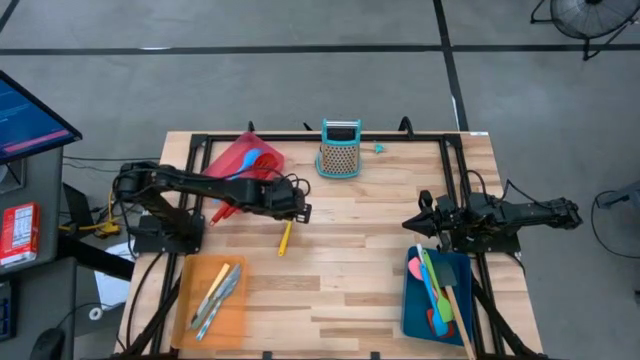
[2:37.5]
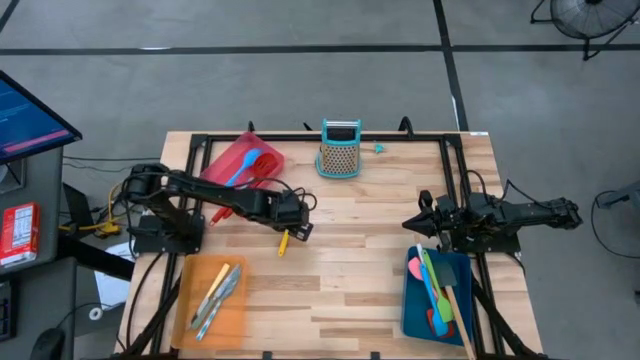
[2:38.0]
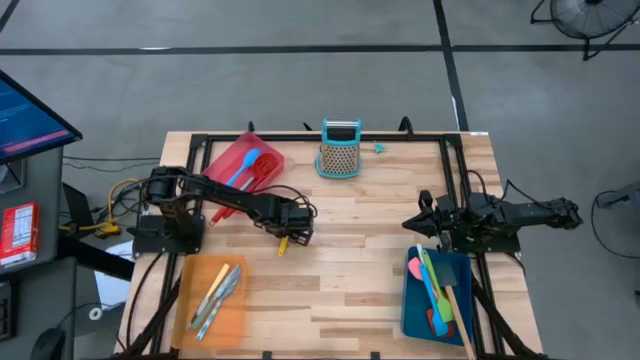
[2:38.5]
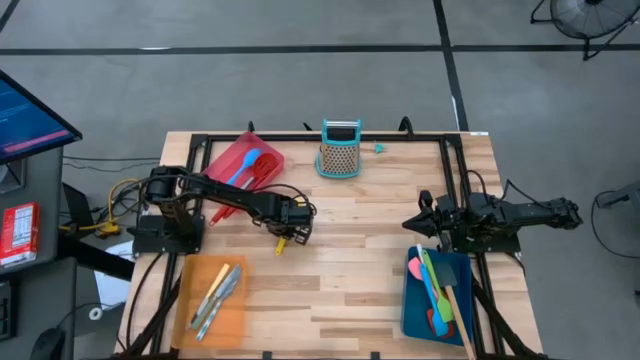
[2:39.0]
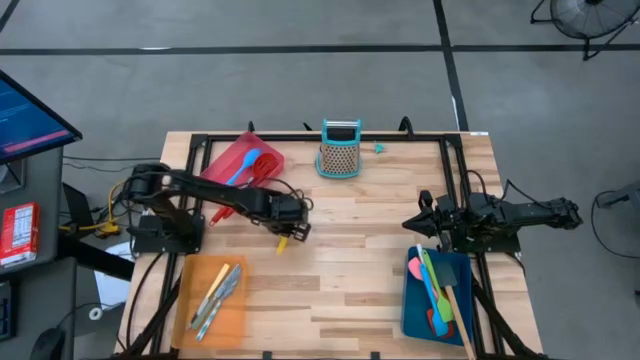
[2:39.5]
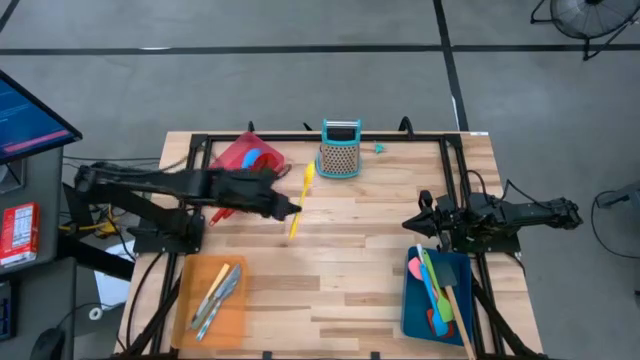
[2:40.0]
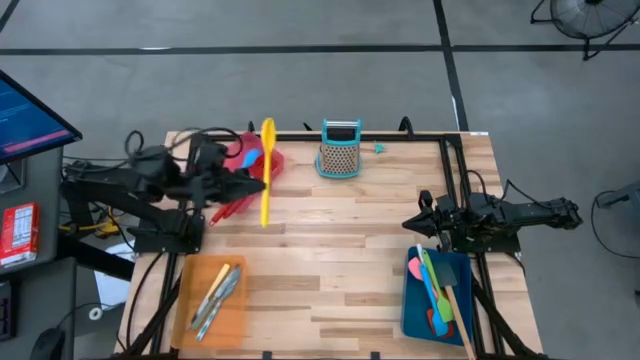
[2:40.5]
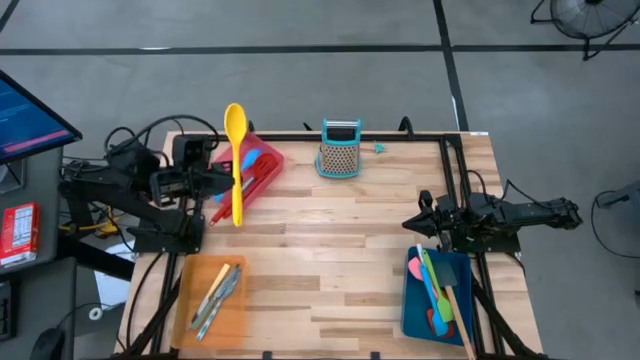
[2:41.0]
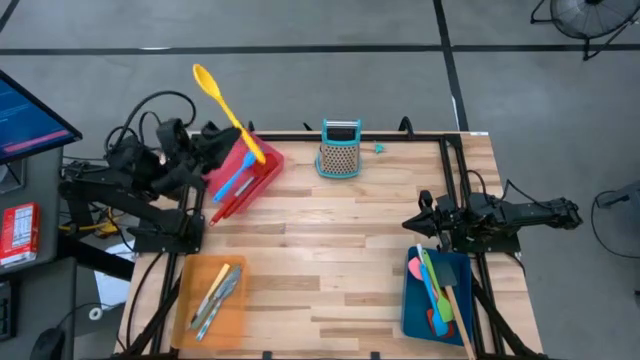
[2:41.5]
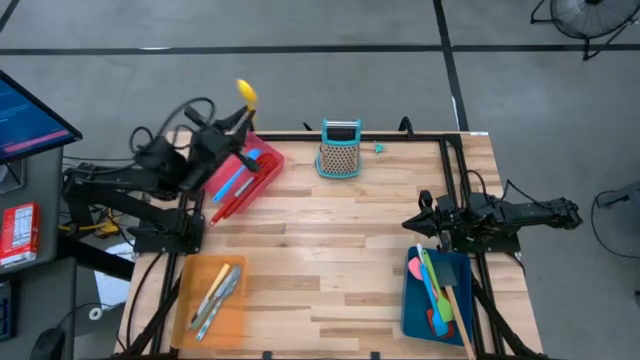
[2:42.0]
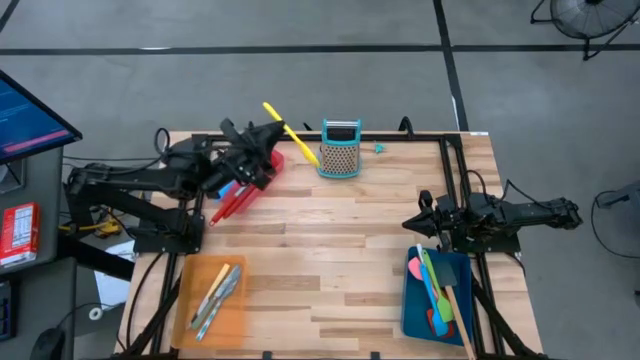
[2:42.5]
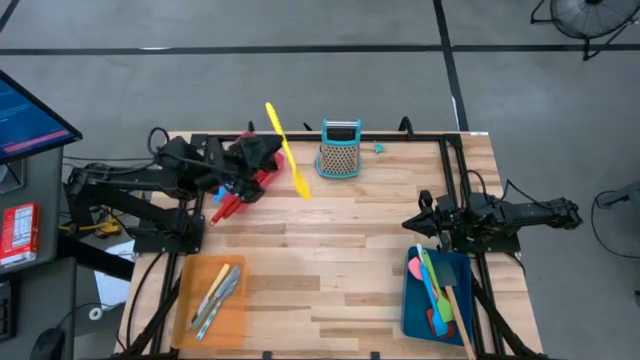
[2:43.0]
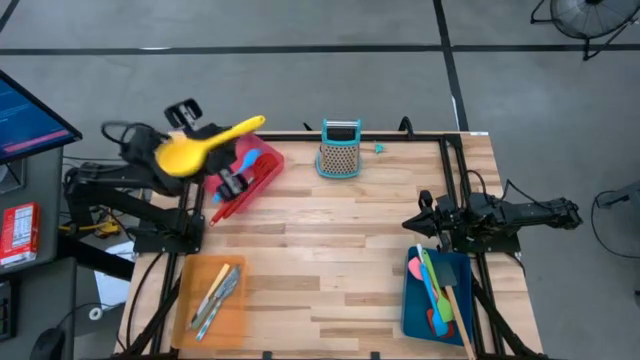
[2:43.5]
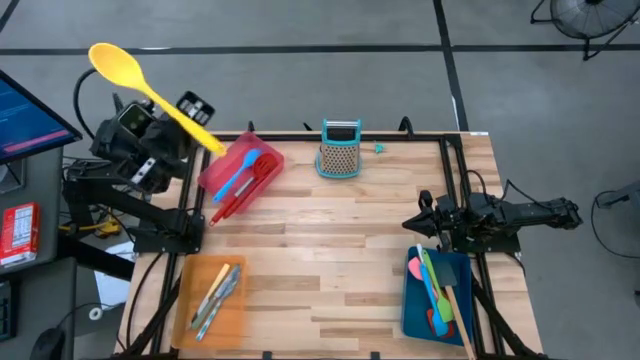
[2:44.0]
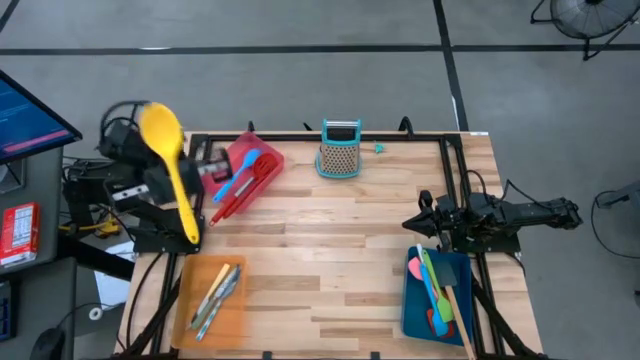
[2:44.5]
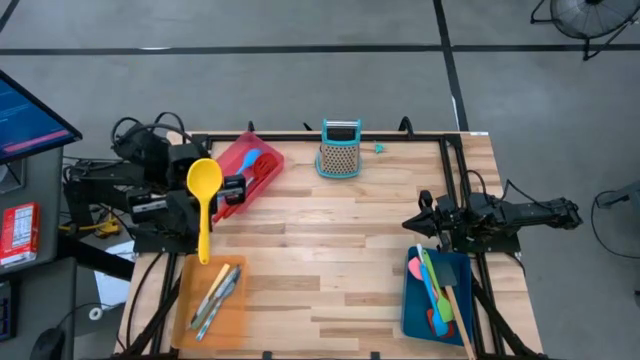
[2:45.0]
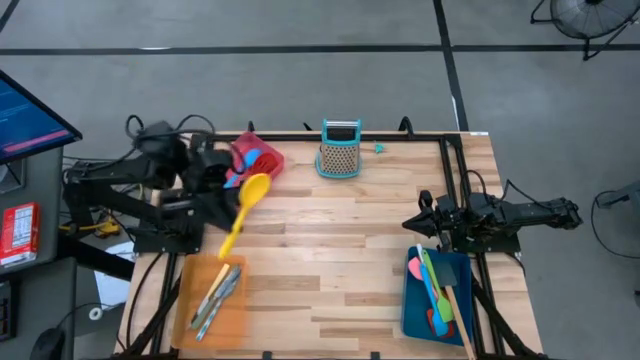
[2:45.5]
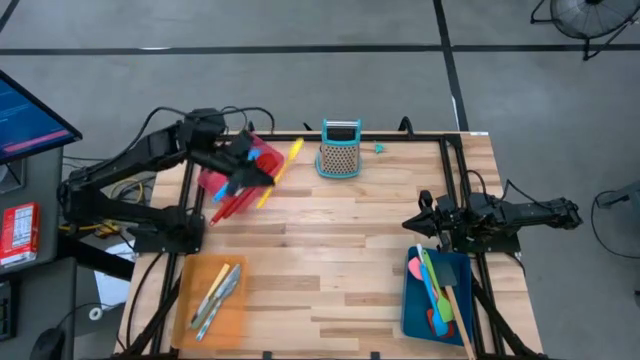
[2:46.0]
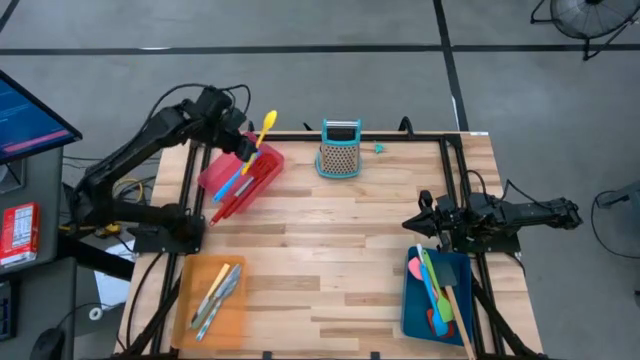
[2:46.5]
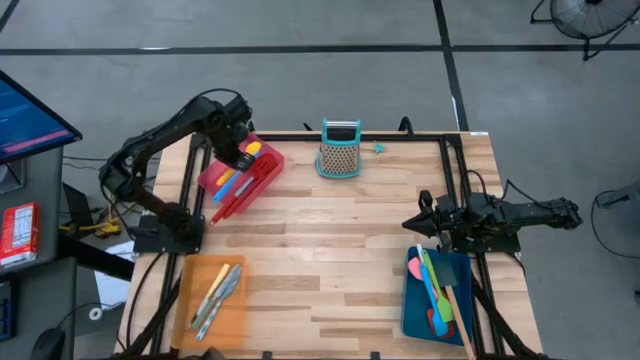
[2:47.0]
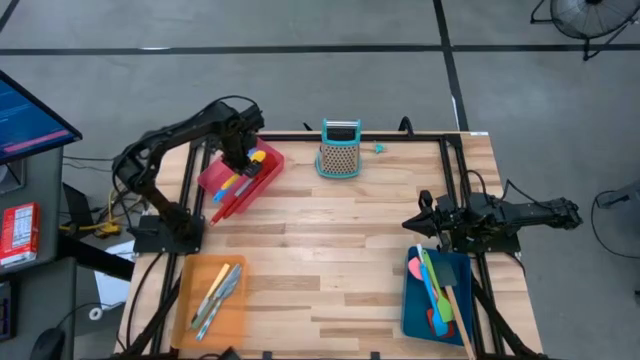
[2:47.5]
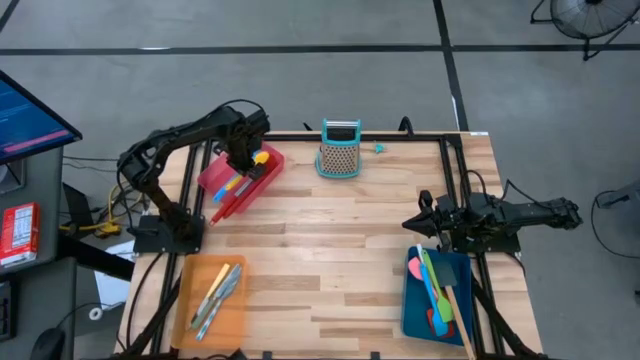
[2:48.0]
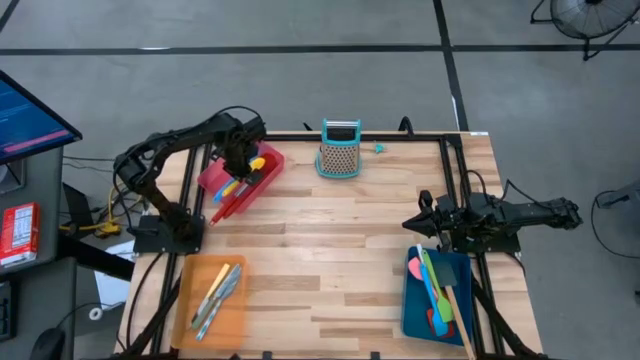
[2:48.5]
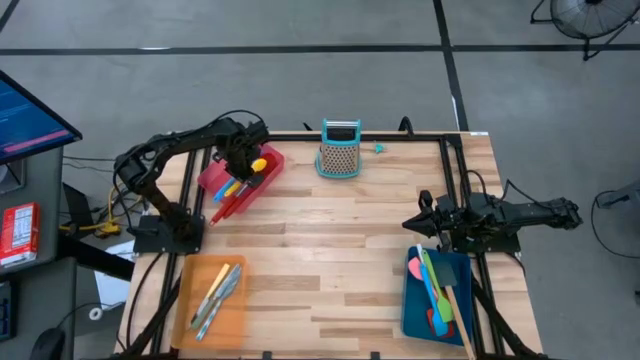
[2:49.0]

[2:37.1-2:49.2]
Task: Pick & Place Kitchen Items
Put the yellow serving spoon into the red bin

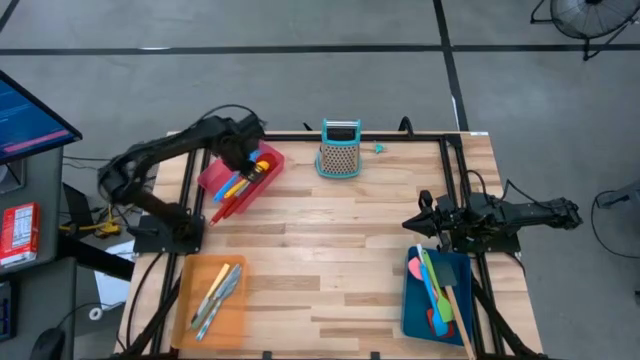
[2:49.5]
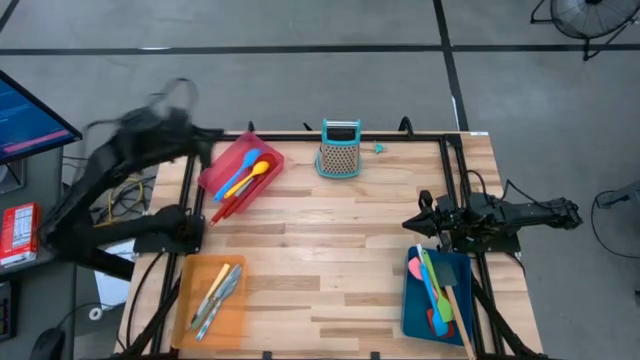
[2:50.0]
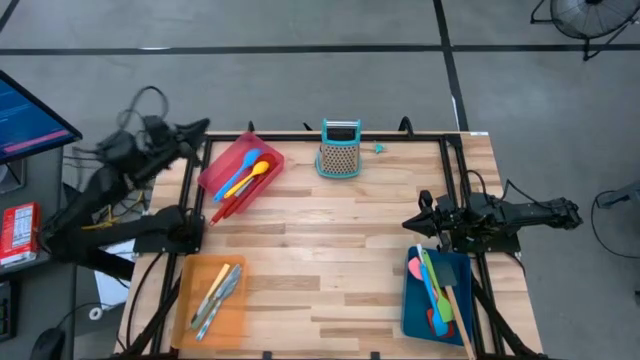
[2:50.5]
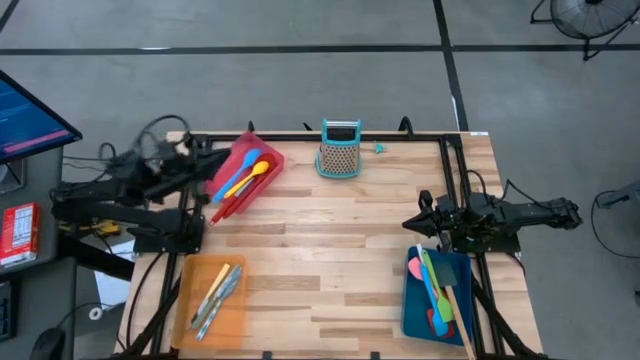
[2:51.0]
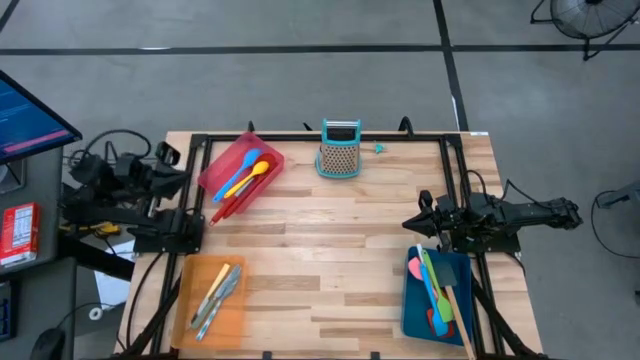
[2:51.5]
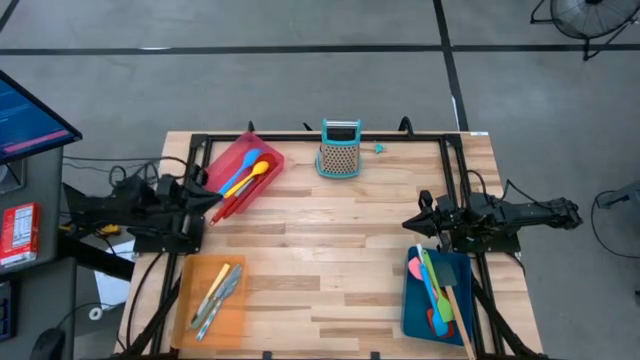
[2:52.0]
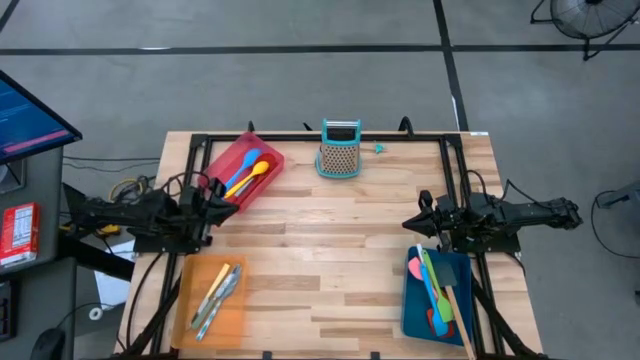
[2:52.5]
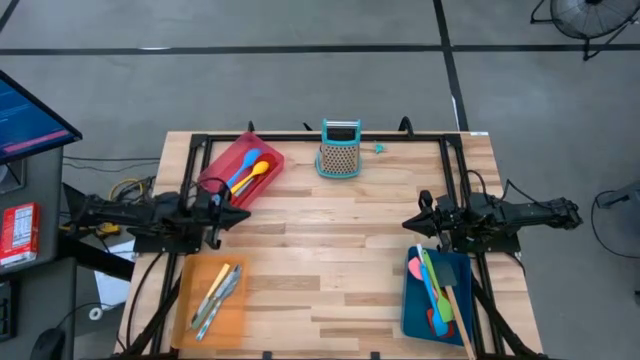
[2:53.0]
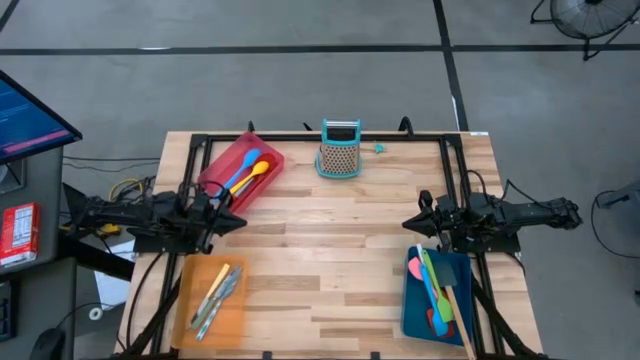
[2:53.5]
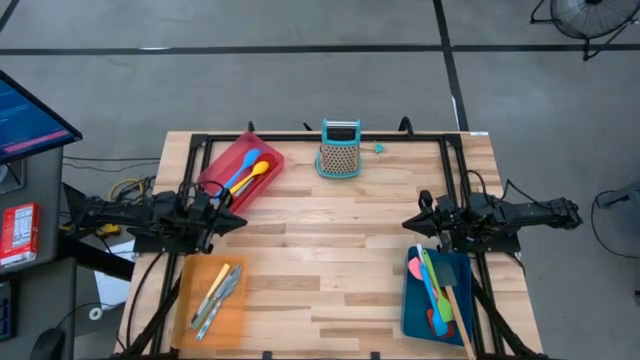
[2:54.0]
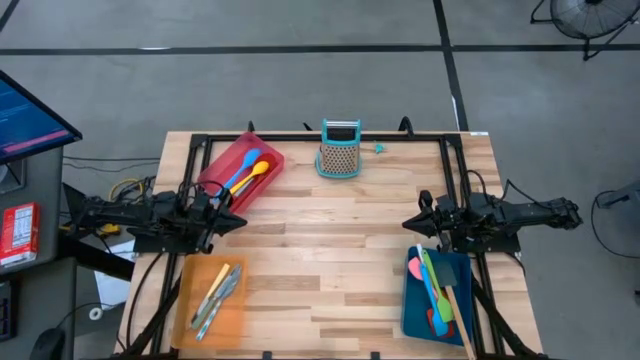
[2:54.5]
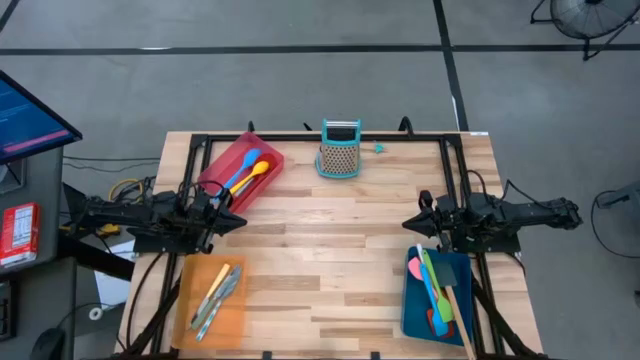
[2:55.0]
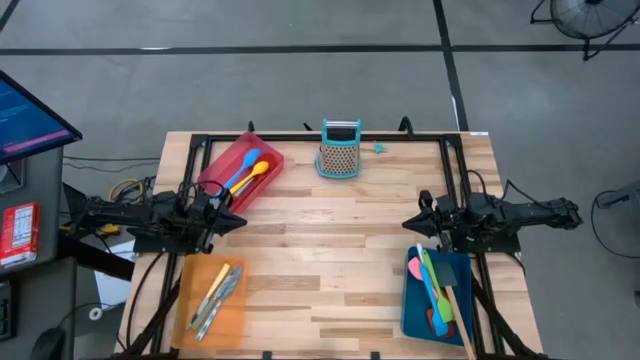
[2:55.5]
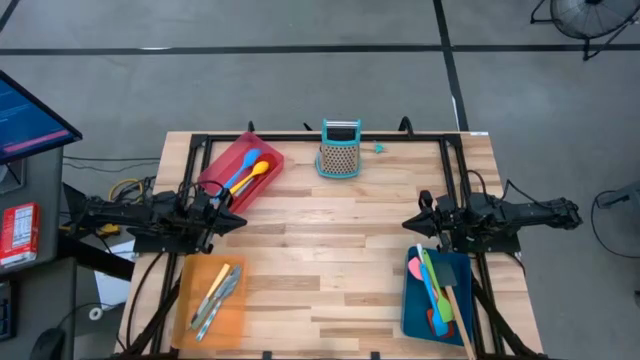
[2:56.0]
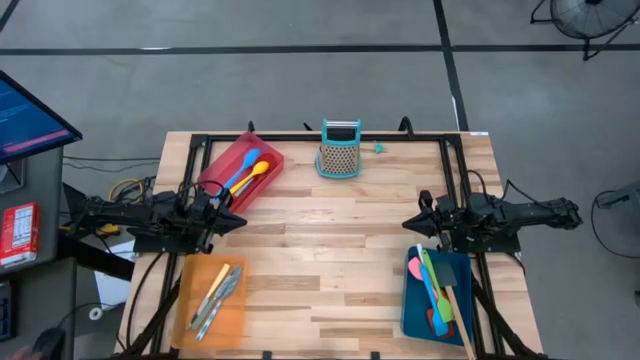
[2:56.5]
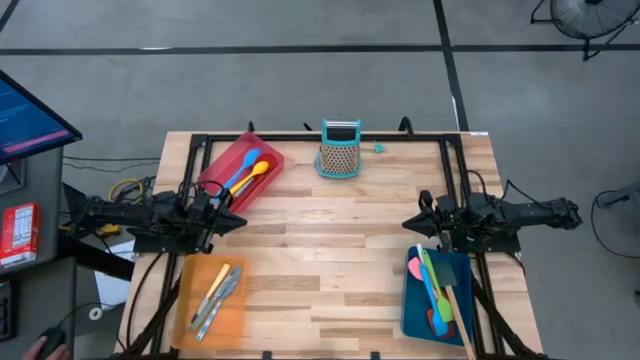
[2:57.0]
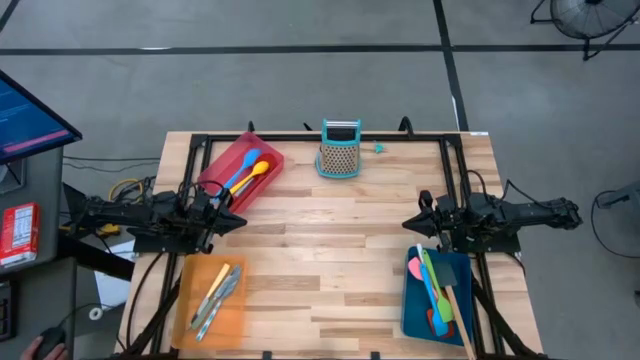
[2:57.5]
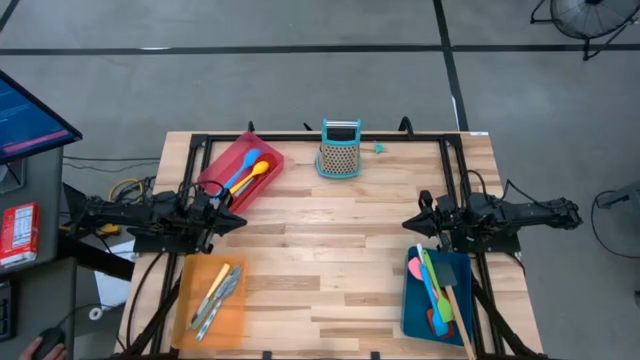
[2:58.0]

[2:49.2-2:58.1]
Return to Home Position

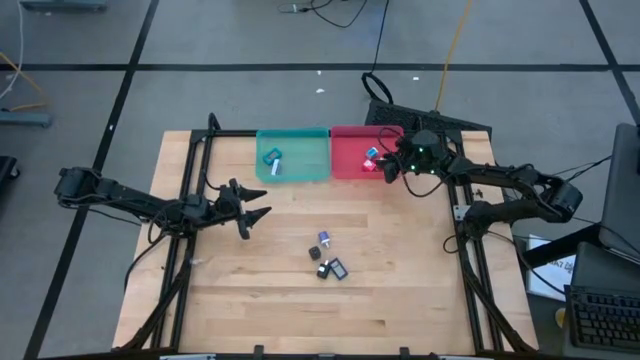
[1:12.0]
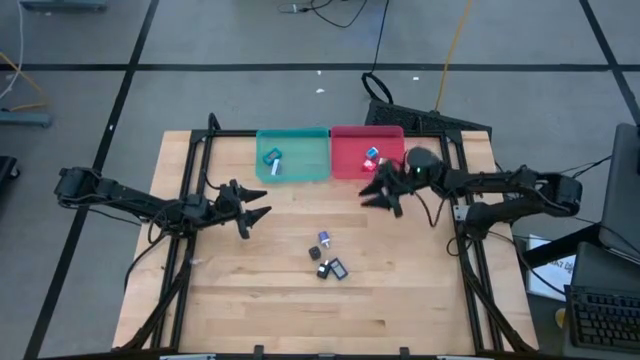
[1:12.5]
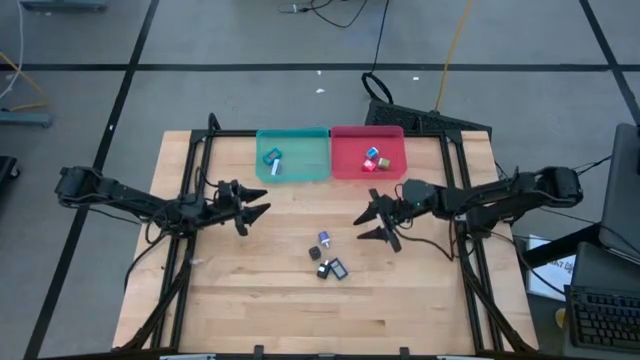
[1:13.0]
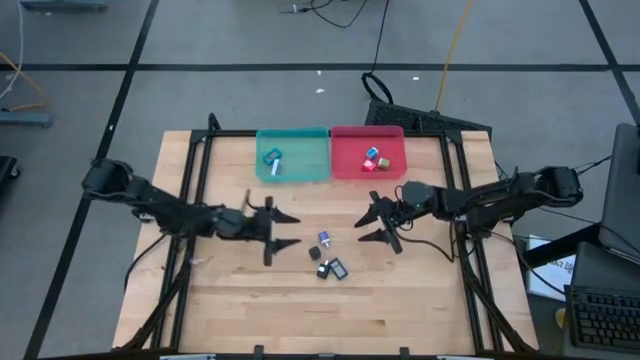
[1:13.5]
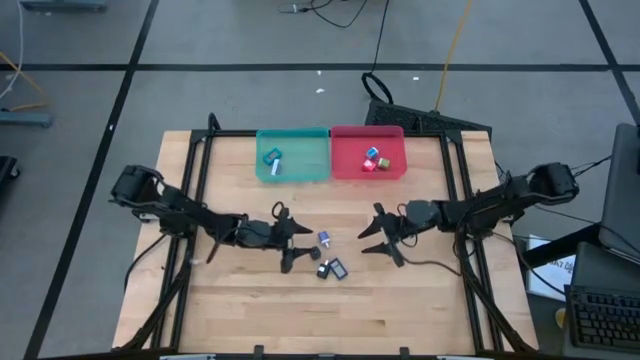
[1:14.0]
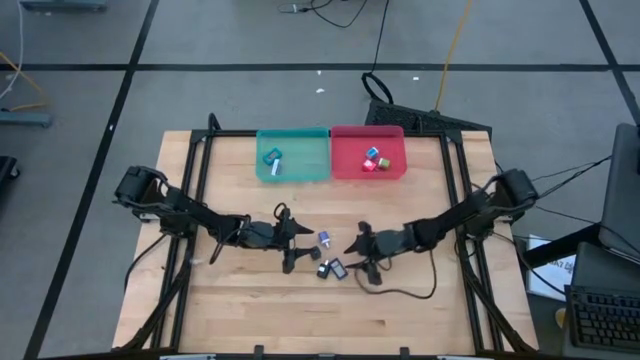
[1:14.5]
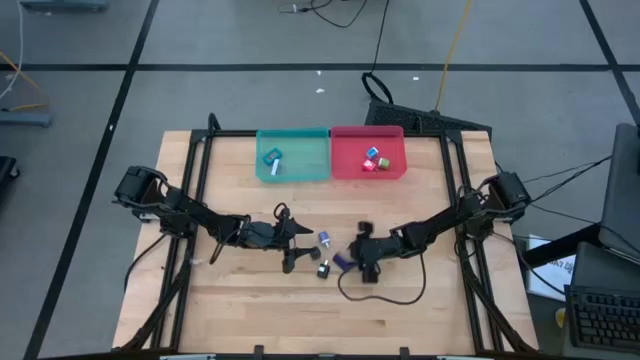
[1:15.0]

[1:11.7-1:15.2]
Task: Sort charging adapters and watches
Put the blue watch in the blue bin
